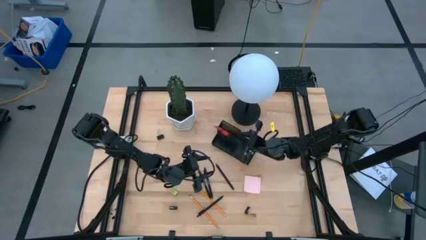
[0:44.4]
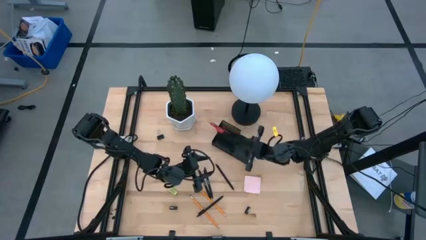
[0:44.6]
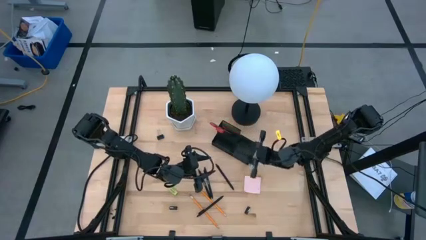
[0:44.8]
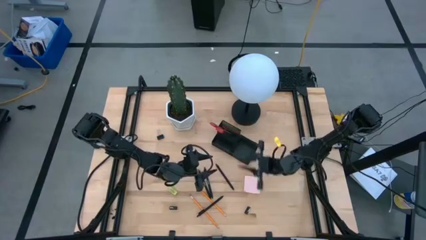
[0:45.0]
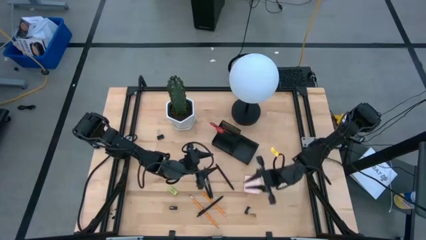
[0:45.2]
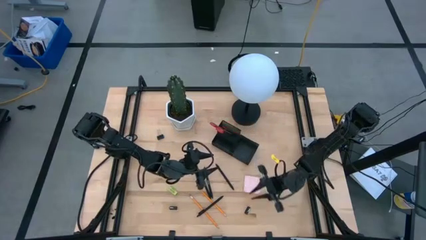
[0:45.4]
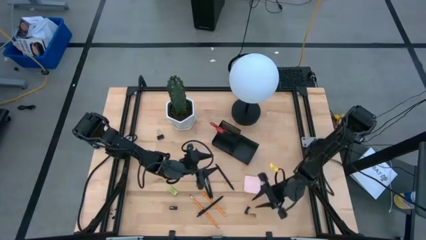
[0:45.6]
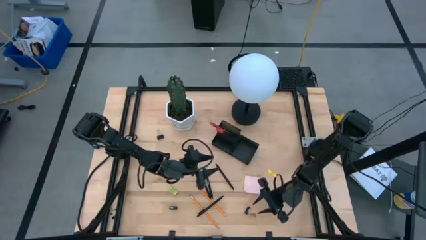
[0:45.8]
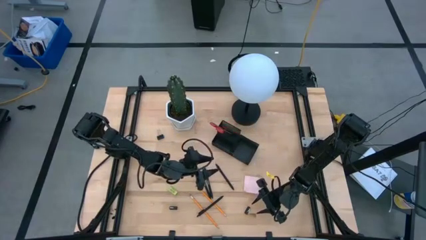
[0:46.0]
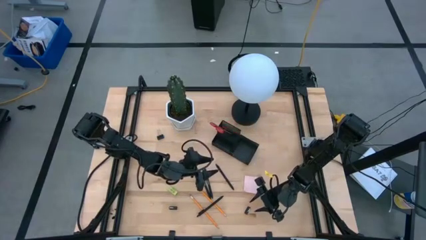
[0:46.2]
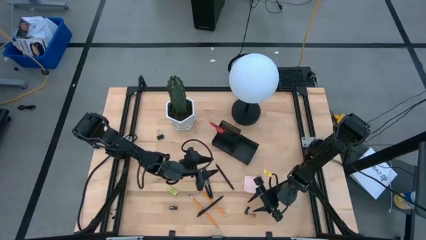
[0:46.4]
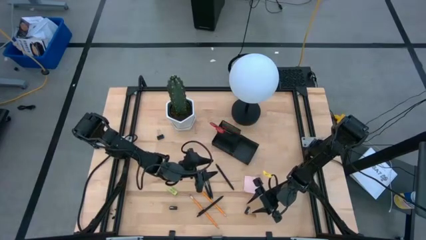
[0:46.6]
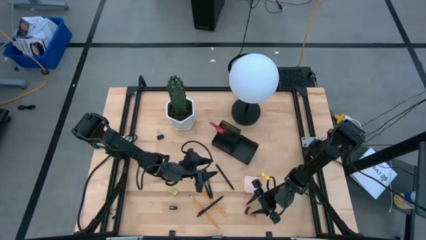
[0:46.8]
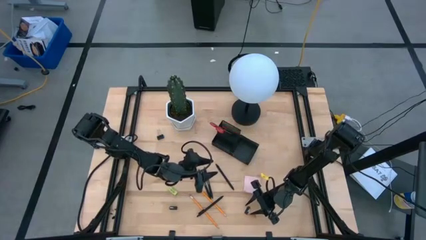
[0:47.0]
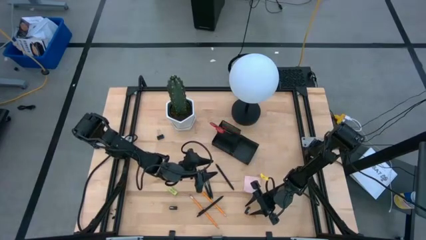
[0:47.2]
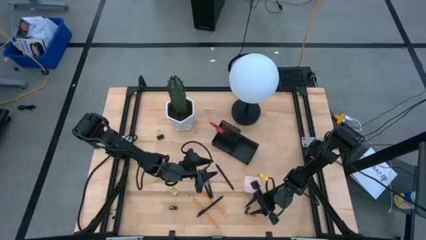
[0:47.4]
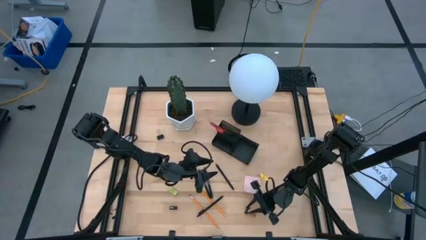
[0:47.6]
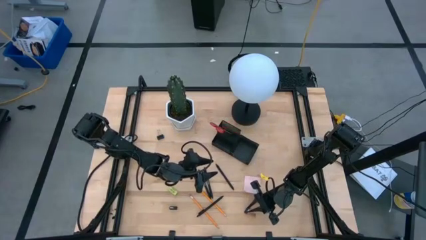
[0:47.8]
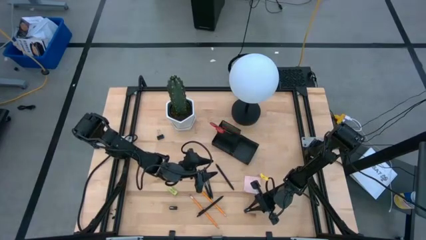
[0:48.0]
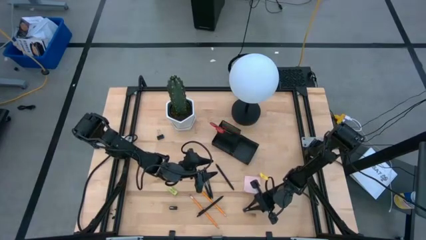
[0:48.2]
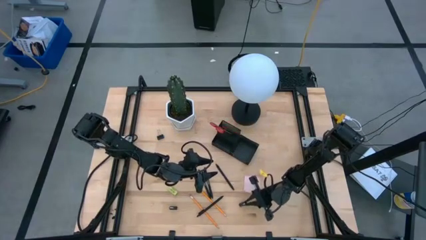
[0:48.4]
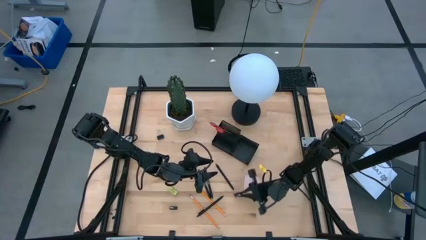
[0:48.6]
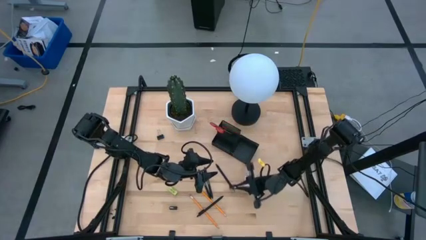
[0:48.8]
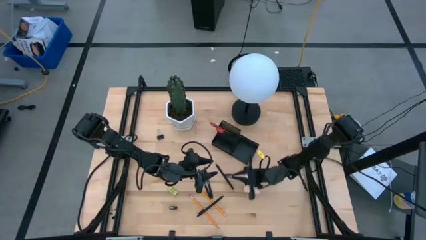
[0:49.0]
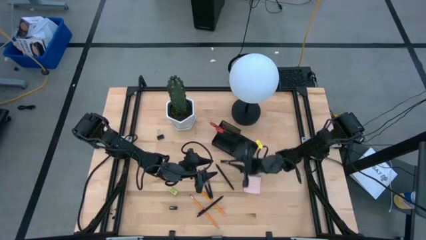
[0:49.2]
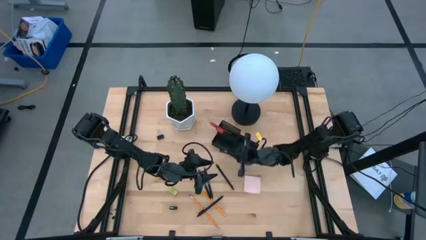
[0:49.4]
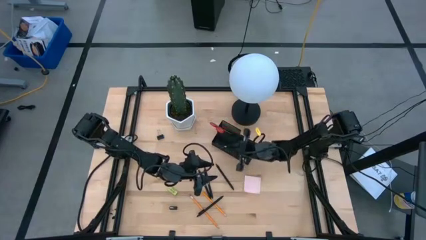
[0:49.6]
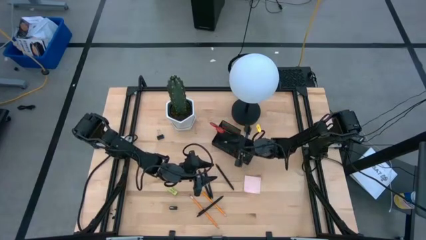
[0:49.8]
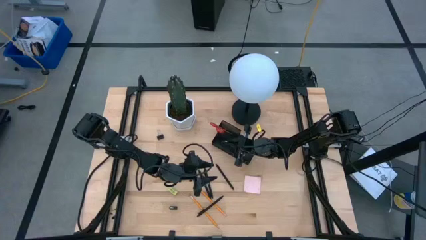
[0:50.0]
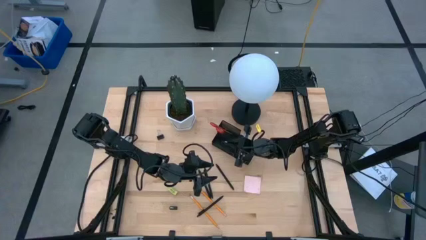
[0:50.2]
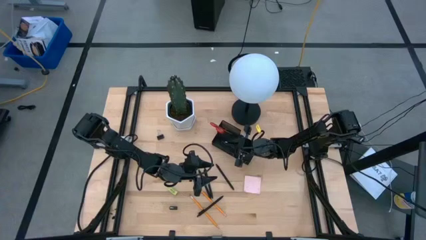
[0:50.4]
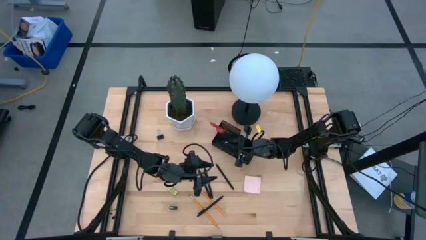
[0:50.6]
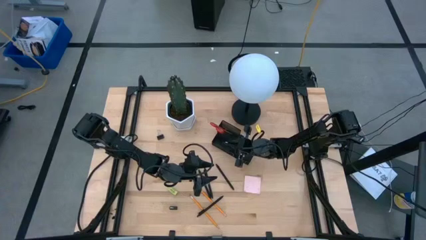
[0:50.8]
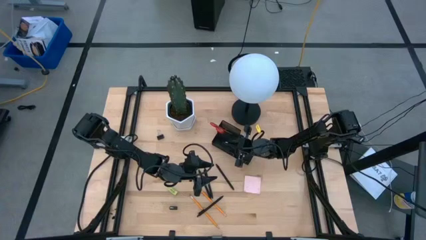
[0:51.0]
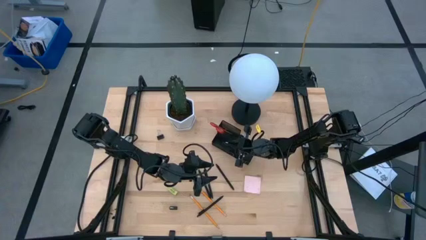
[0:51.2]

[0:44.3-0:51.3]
Task: Pick and place office supplies into organizer
Put the black binder clip into the black desk organizer

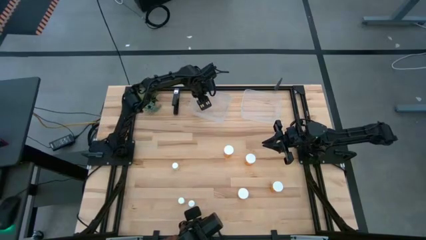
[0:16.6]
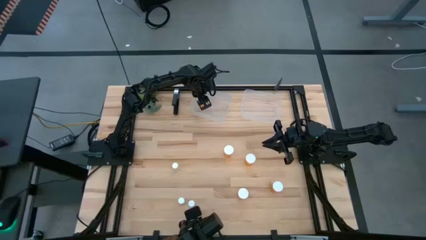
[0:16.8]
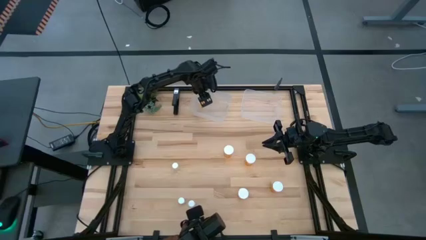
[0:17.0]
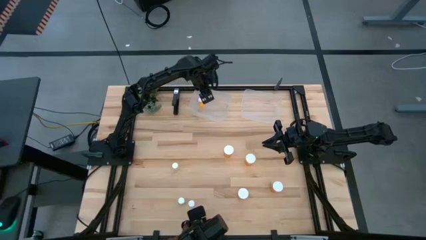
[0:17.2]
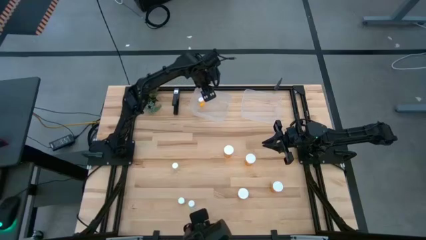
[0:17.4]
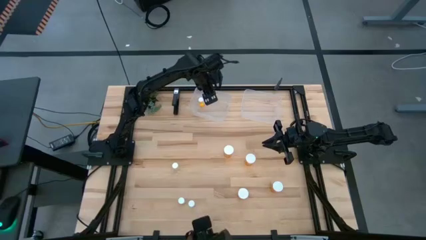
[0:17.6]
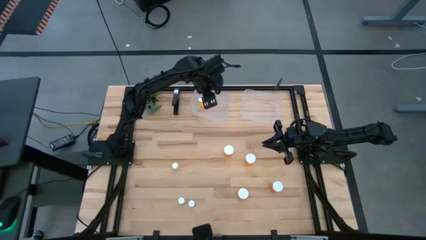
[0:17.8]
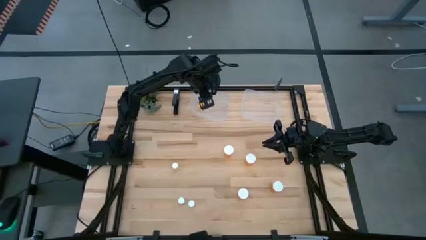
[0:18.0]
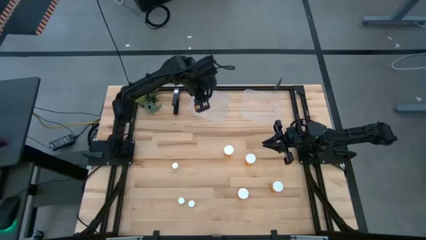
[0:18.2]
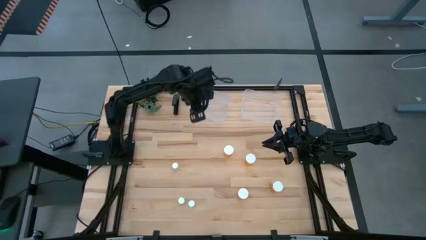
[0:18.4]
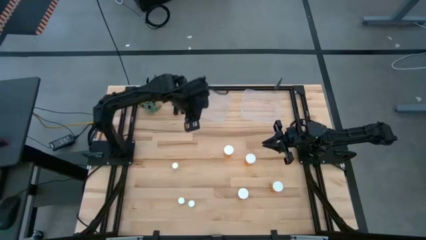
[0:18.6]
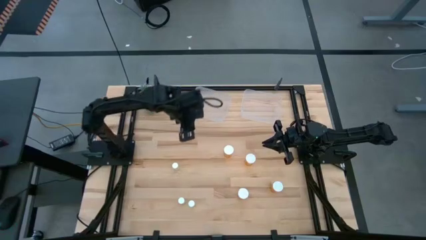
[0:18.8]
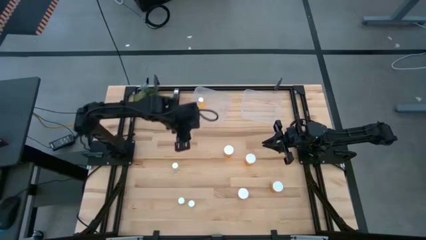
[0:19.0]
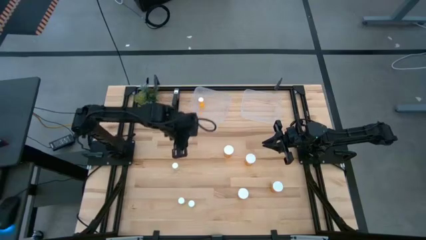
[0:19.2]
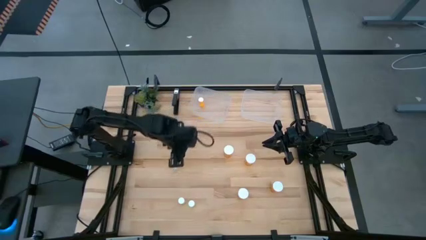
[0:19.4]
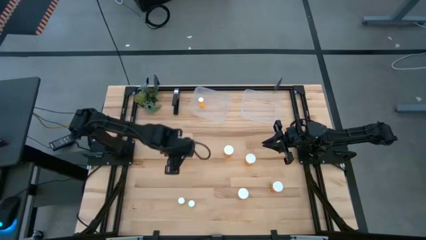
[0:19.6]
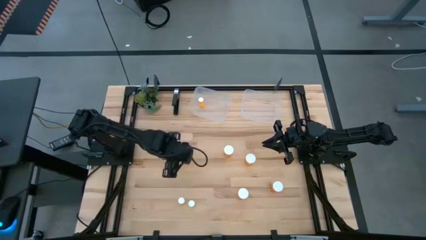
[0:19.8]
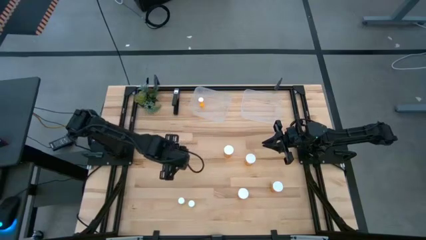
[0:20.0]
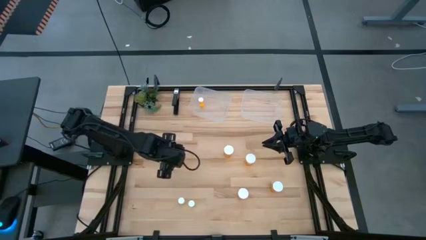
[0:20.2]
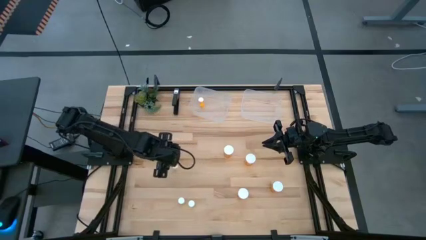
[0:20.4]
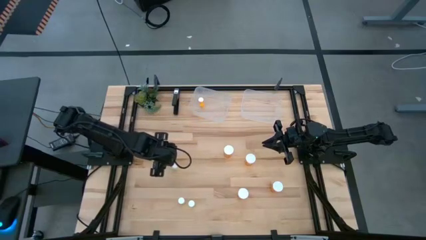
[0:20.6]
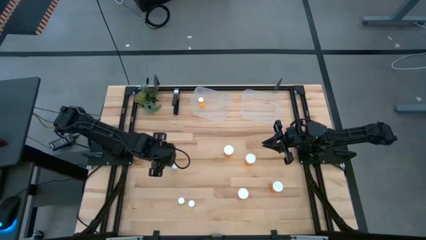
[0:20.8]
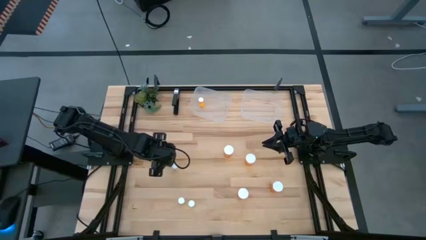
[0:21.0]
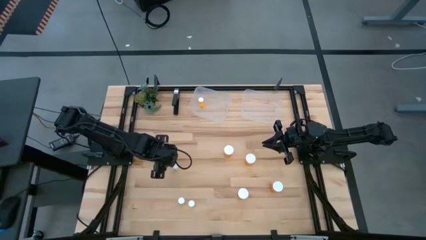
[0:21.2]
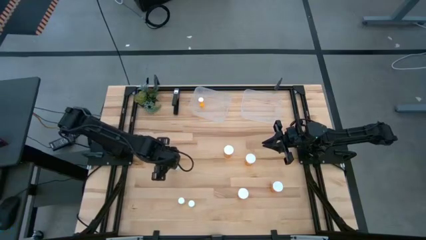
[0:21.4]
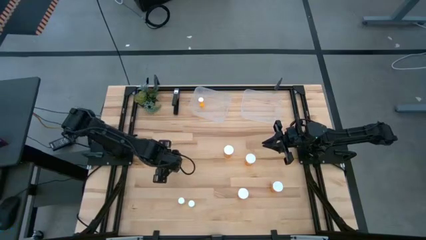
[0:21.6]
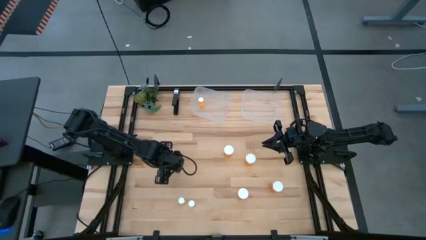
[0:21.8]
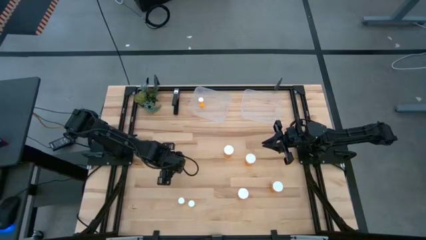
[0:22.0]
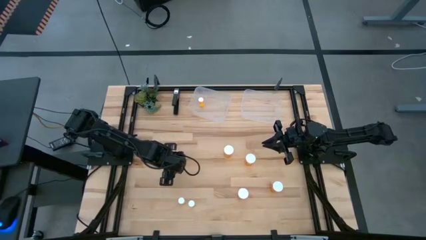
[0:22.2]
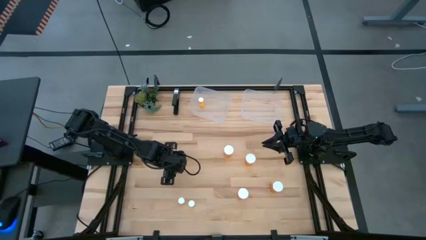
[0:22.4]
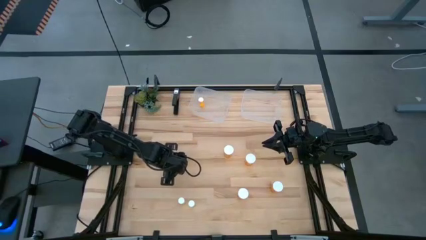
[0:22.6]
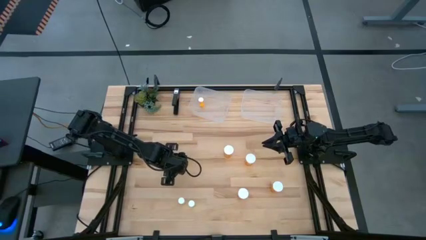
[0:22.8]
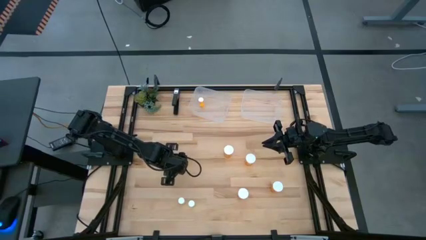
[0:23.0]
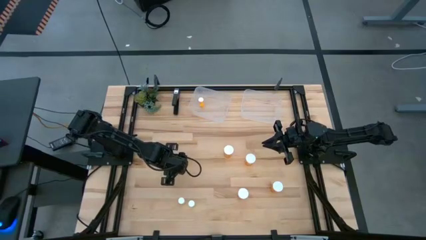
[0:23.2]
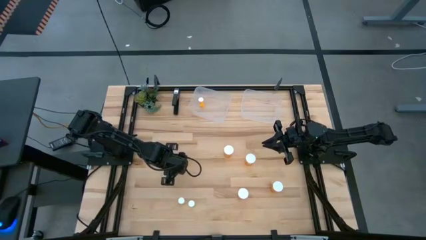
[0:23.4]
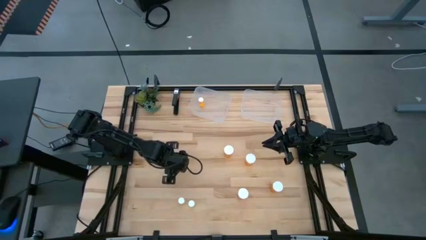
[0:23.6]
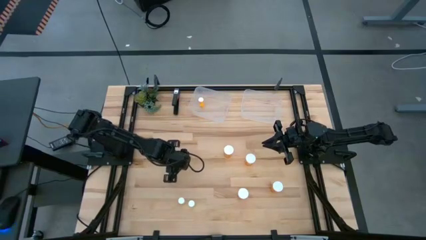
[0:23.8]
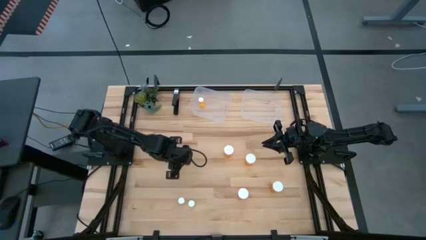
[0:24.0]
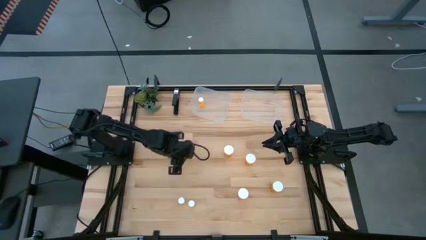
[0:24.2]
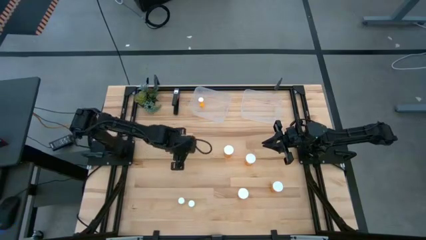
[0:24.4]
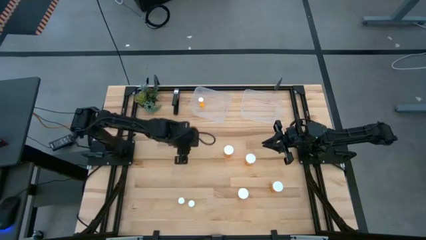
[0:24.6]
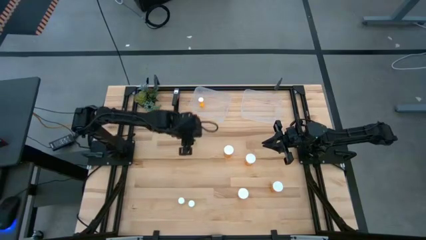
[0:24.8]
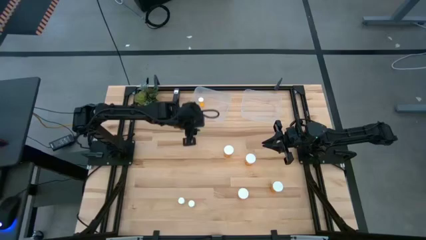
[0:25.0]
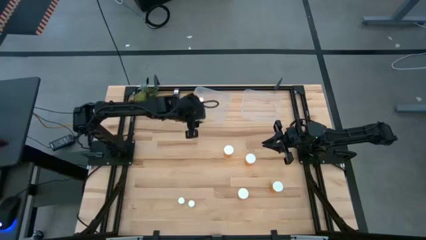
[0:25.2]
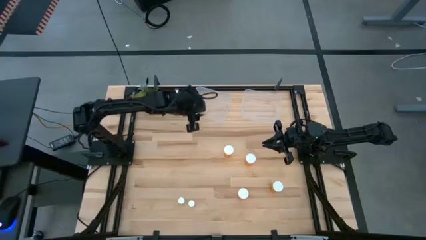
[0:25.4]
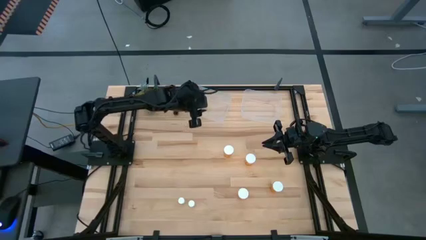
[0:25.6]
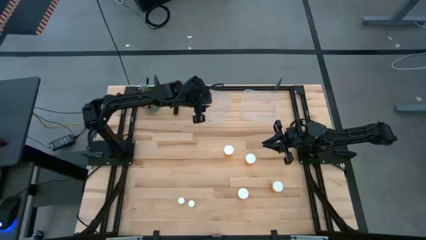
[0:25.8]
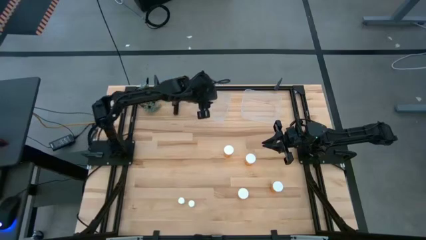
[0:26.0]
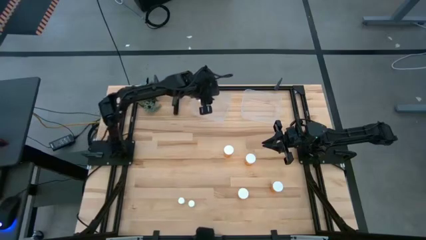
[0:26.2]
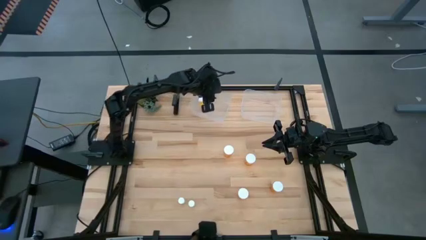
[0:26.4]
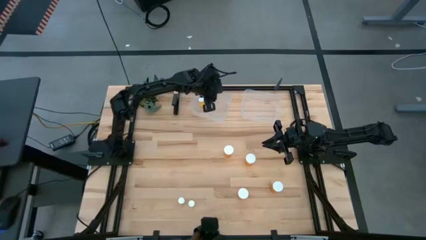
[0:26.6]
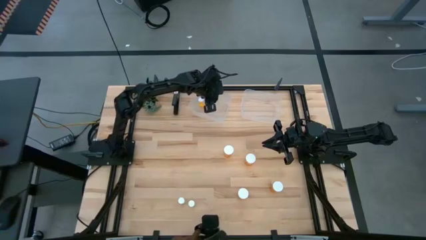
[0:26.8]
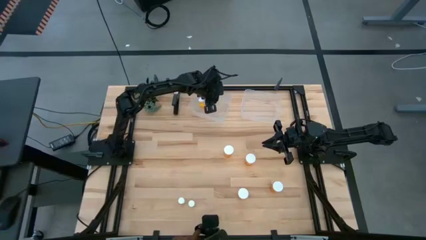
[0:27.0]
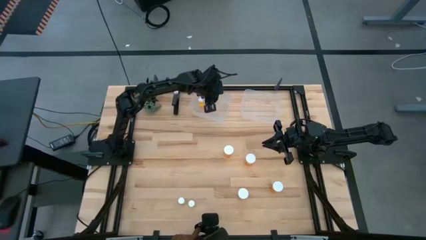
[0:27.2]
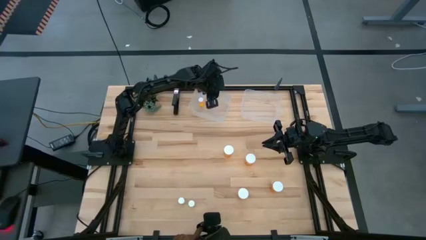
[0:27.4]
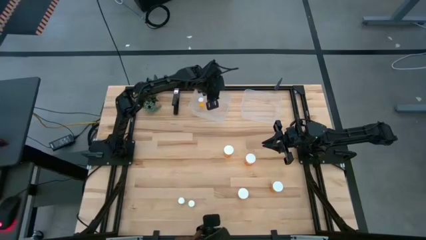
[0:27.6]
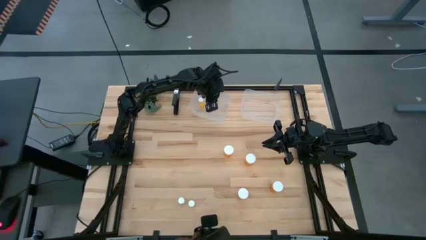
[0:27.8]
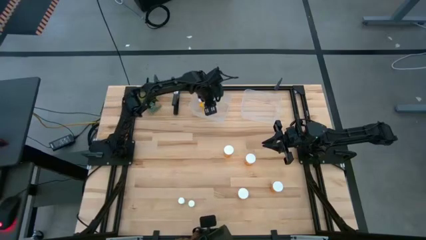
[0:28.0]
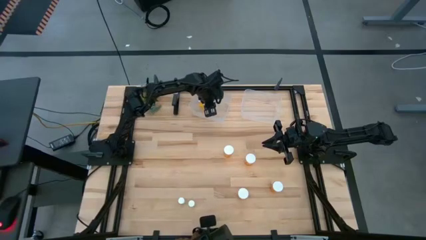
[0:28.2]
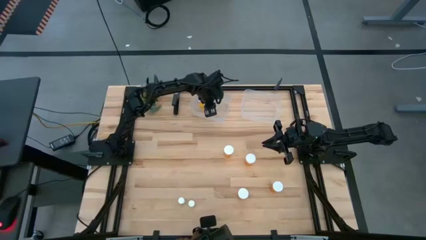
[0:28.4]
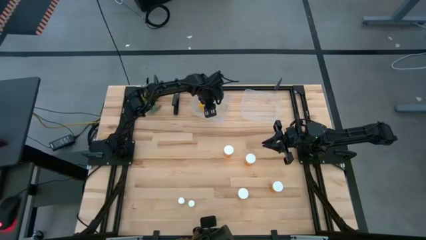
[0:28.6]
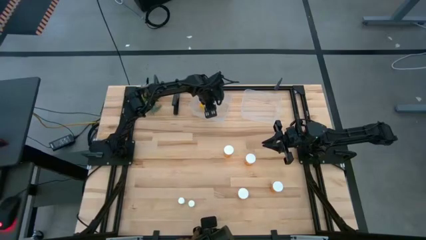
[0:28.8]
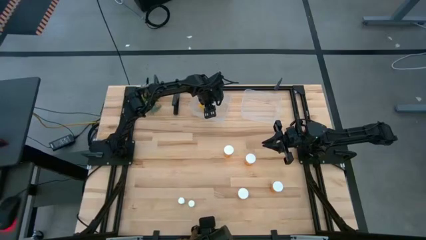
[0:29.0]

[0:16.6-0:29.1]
Task: Pick and place medicine bottles into bin by pill shape (circle, oval)
Put the small yellow pill bottle into the left transparent bin
